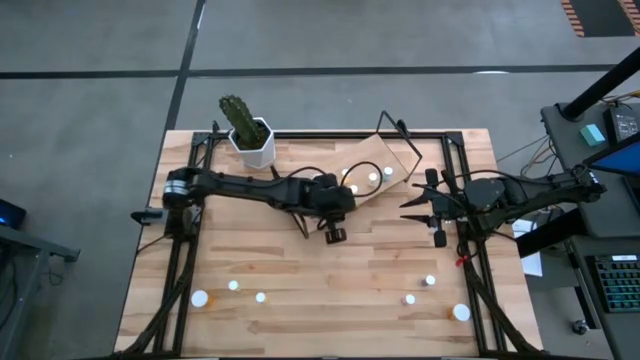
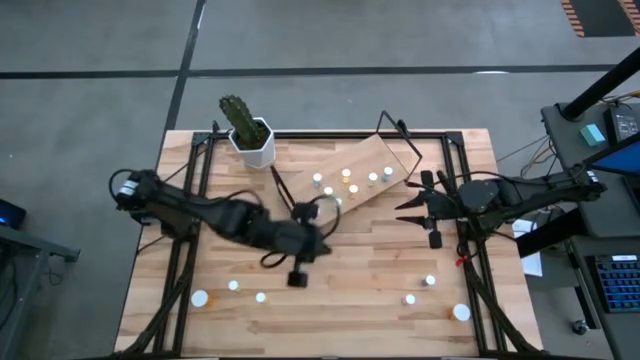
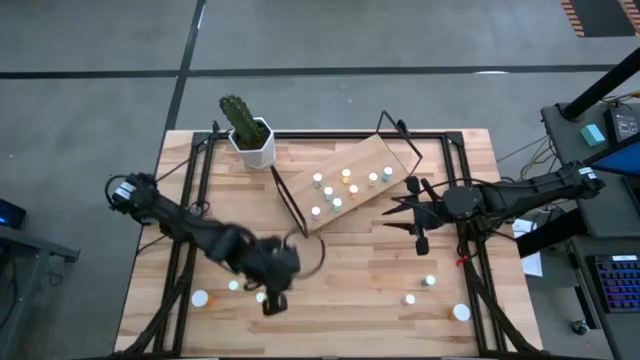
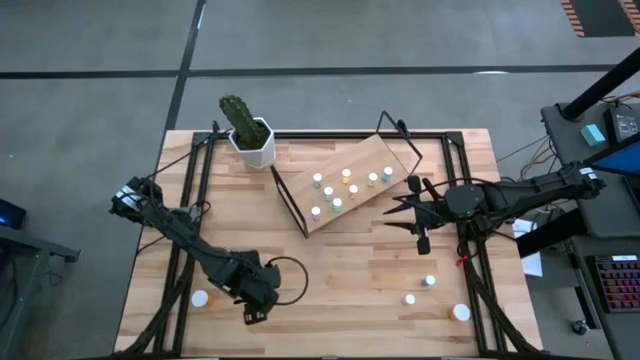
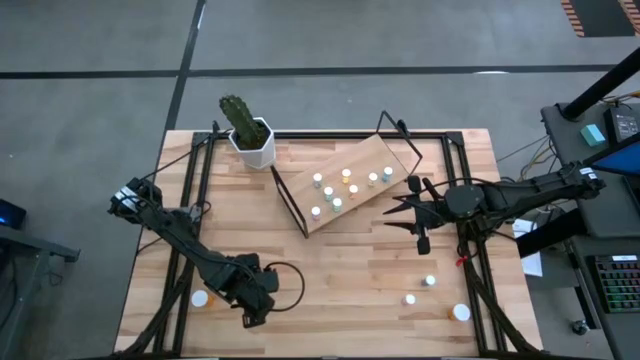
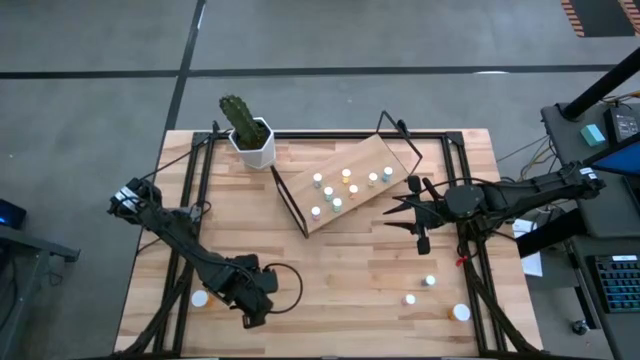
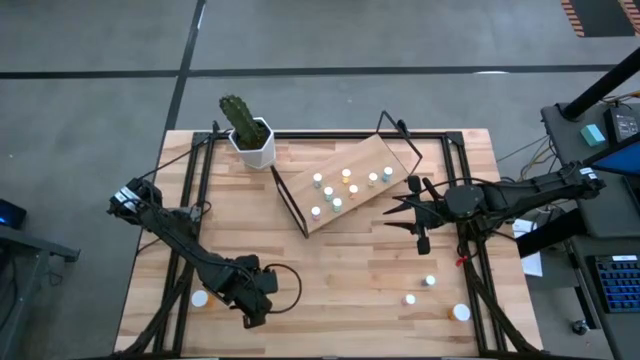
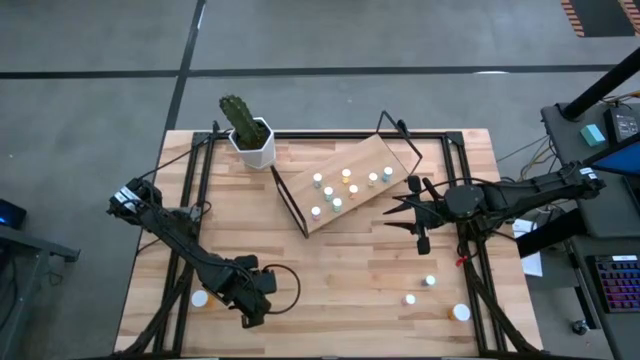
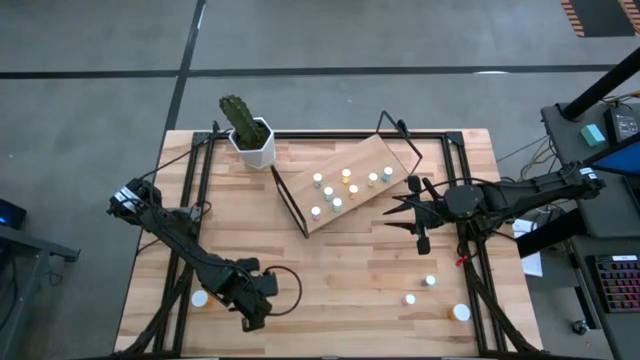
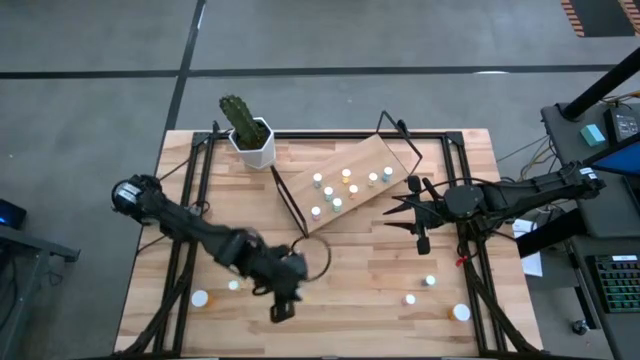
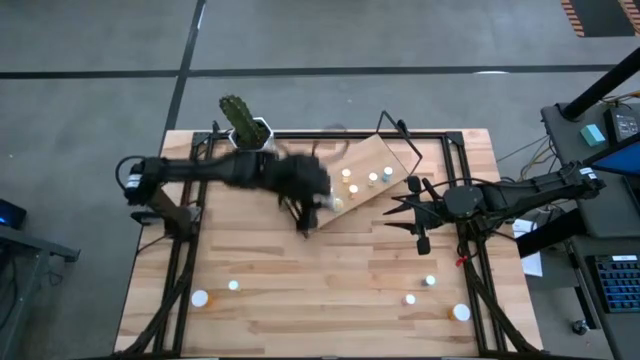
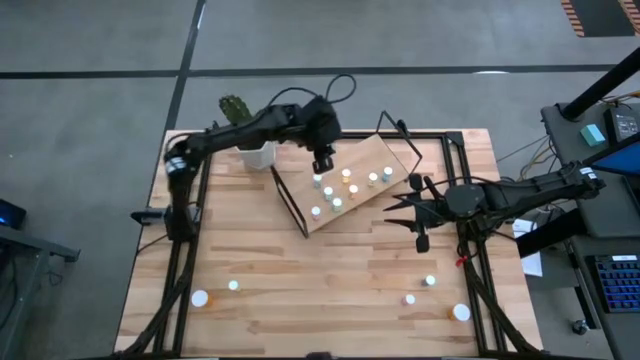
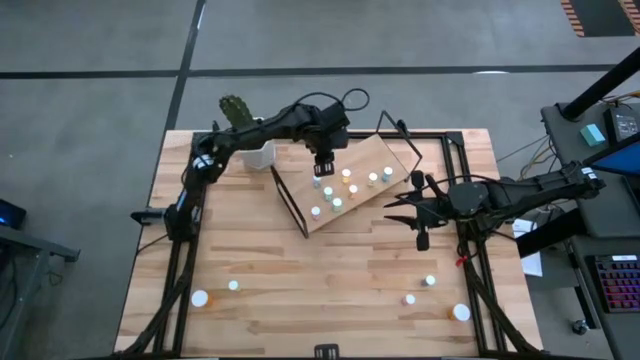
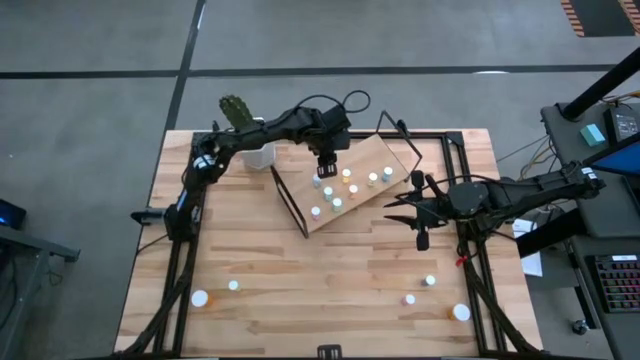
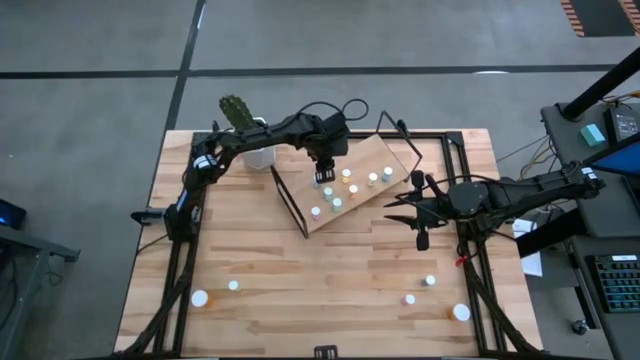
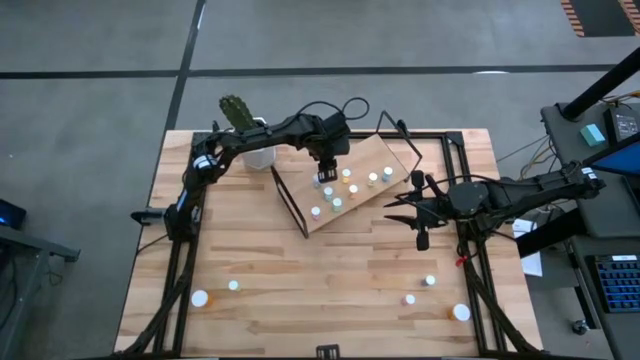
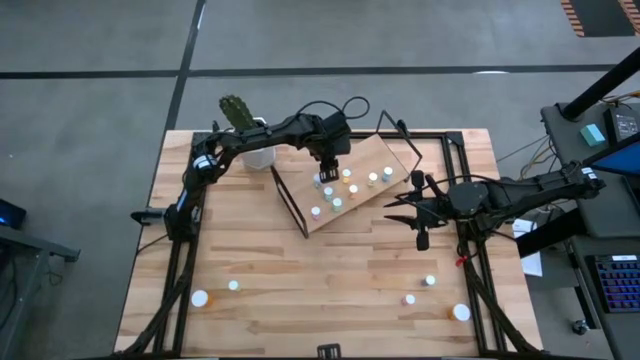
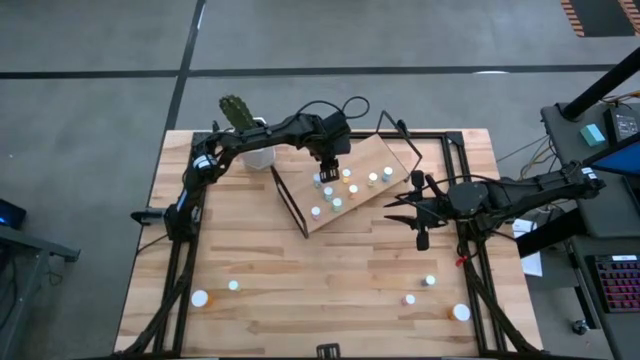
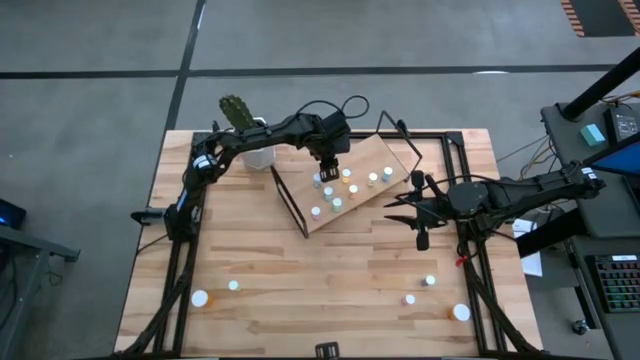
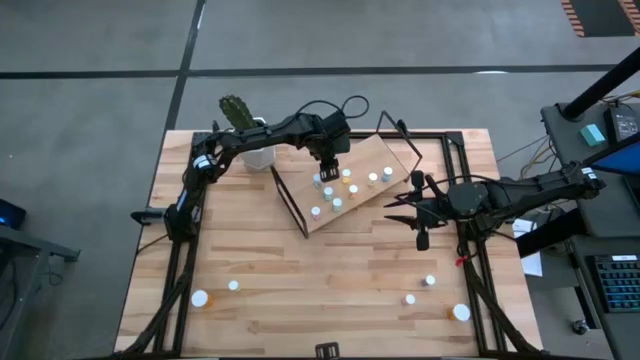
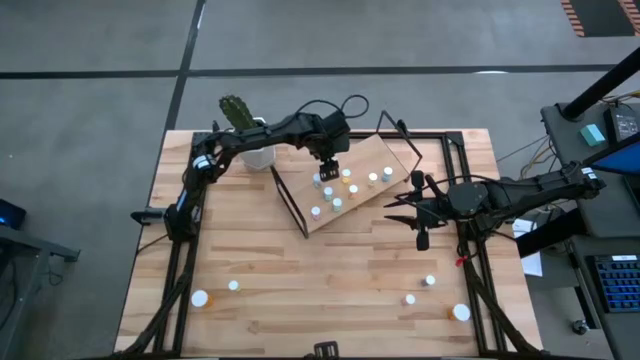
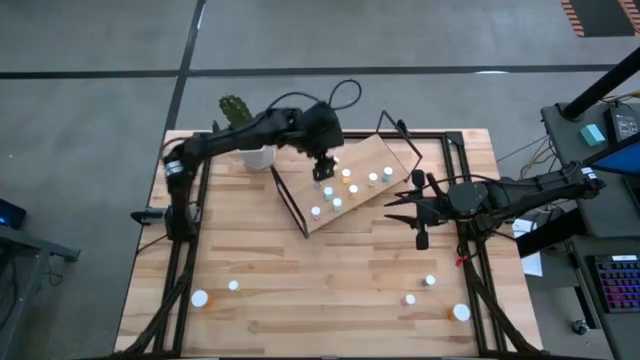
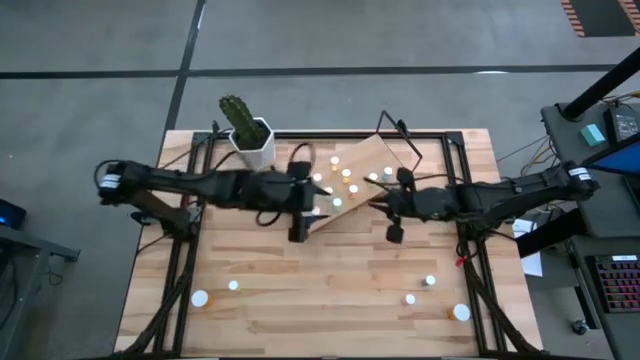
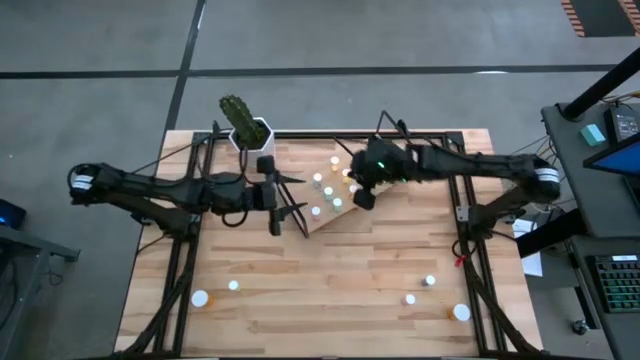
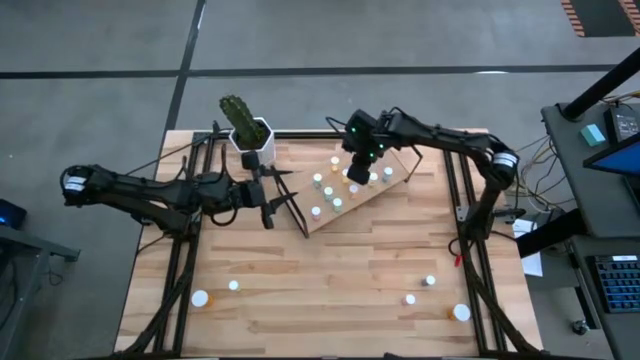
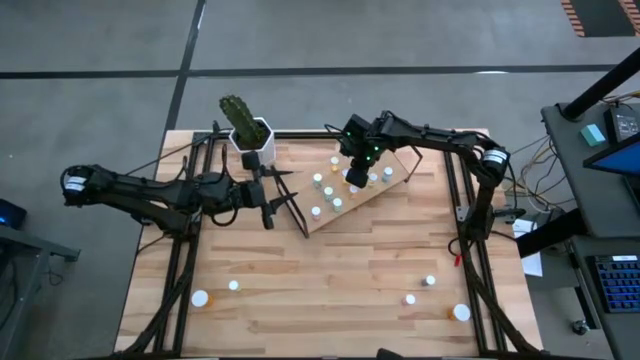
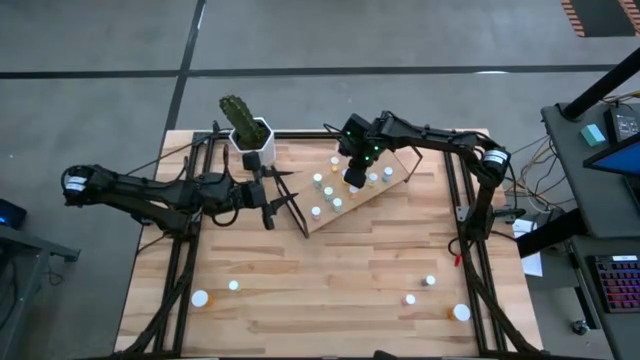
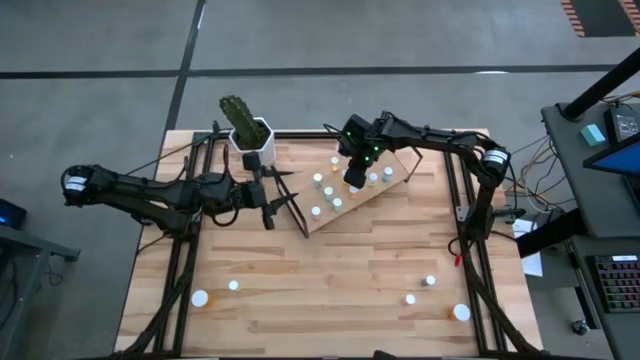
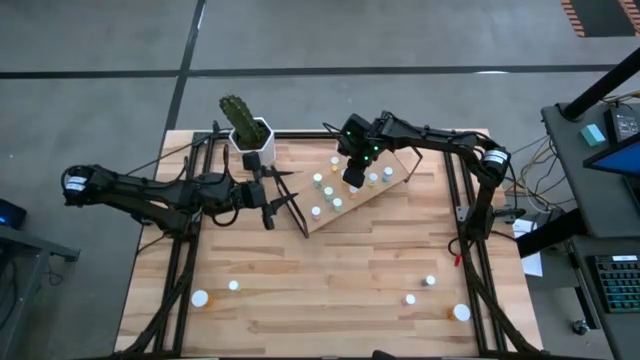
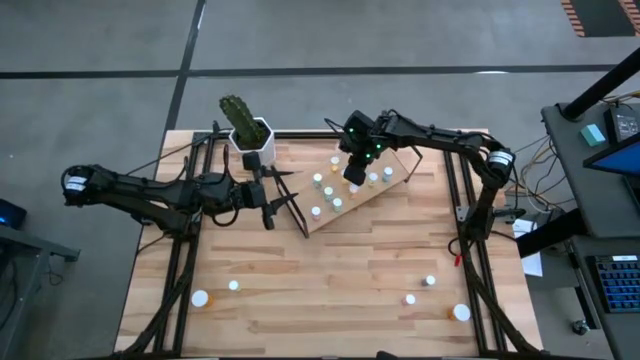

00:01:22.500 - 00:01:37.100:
Task: Pick and place medicine bottles onto shelf by color
Put the yellow pill bottle on the shelf aligned with the other yellow pill bottles

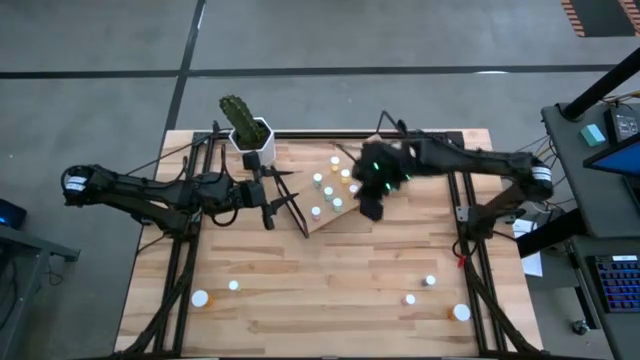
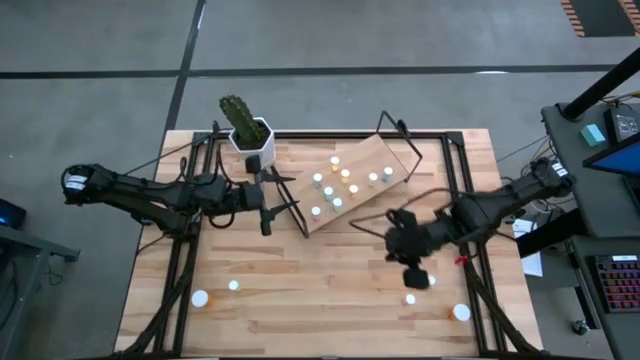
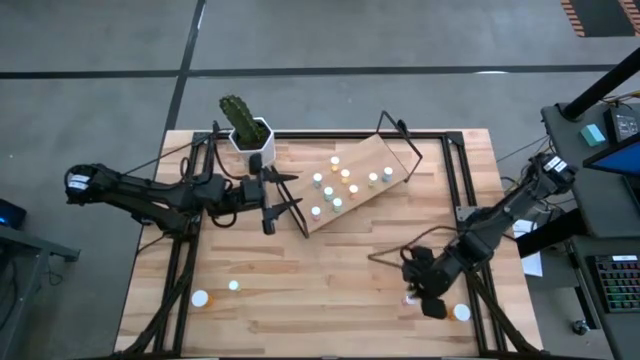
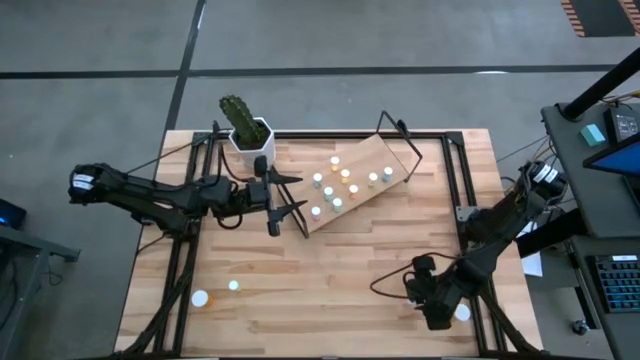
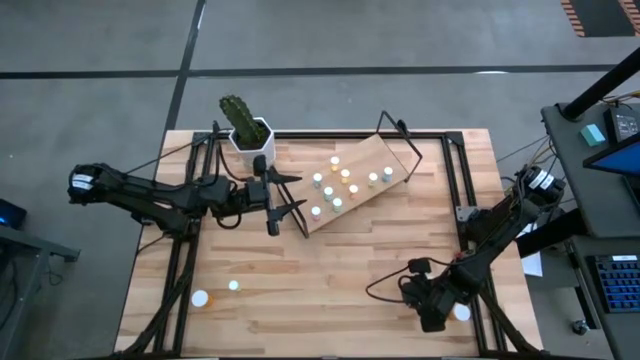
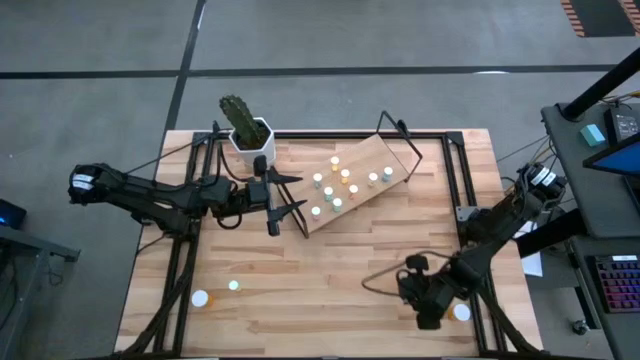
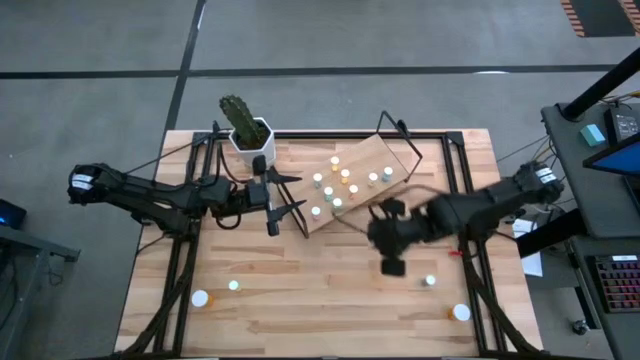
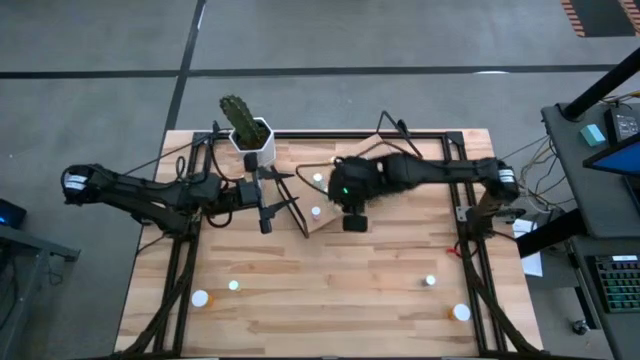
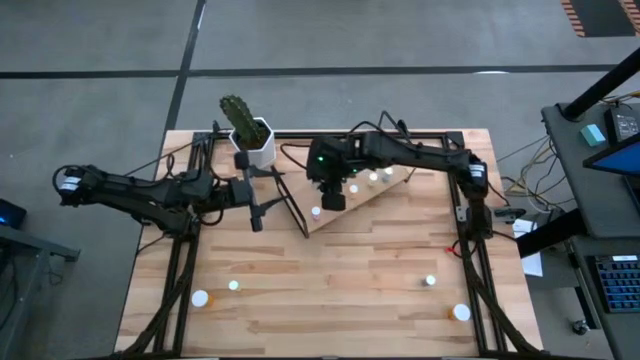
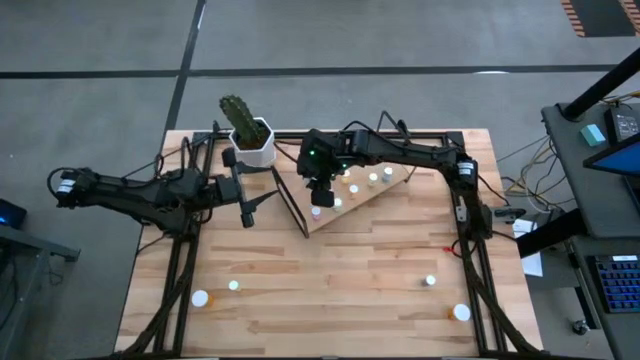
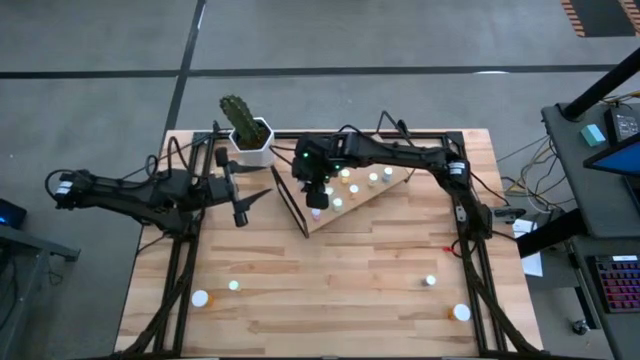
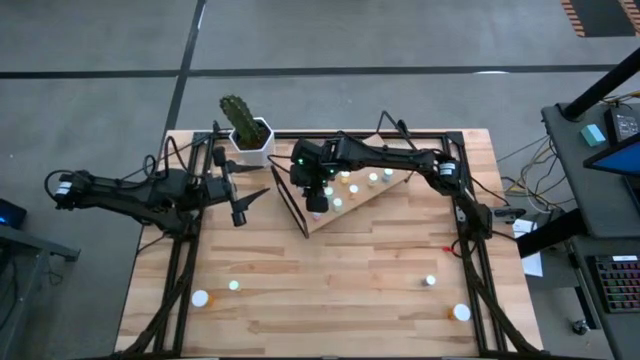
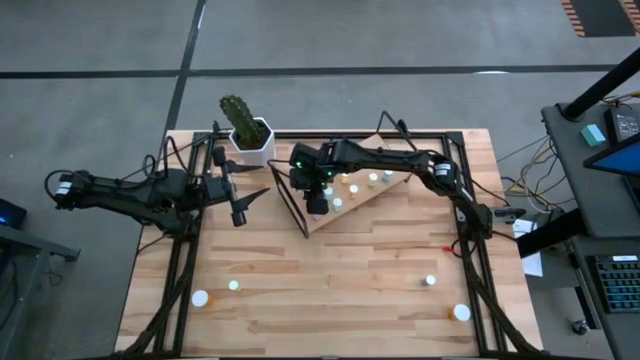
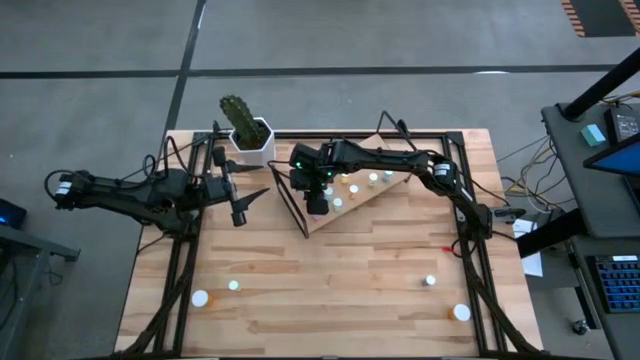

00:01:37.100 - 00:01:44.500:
Put the pink pill bottle on the shelf aligned with the other pink pill bottle

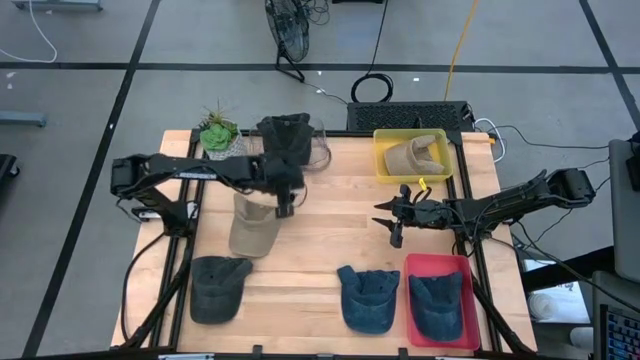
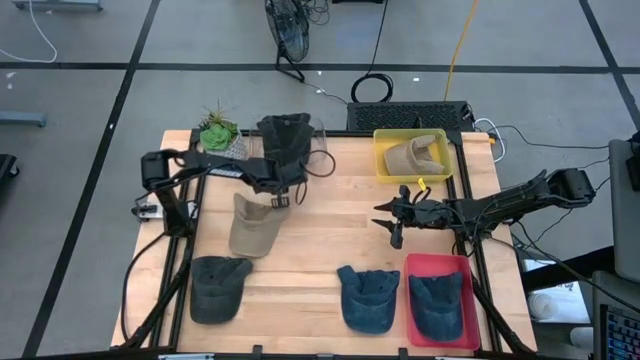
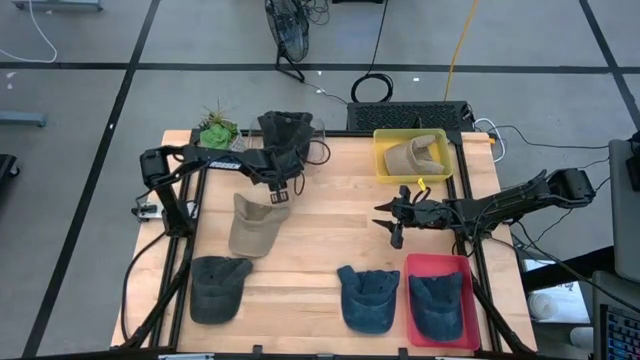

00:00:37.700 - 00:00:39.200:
Task: Pick & Place hat
Adjust the transparent bin
